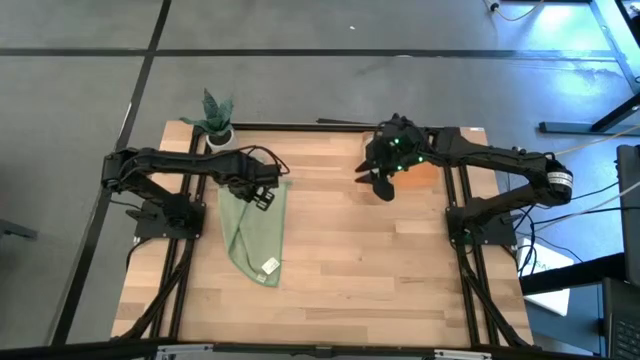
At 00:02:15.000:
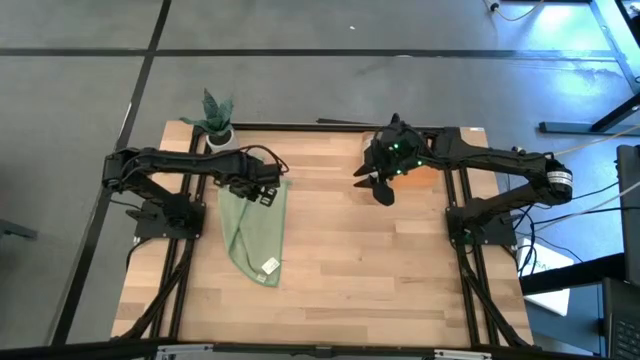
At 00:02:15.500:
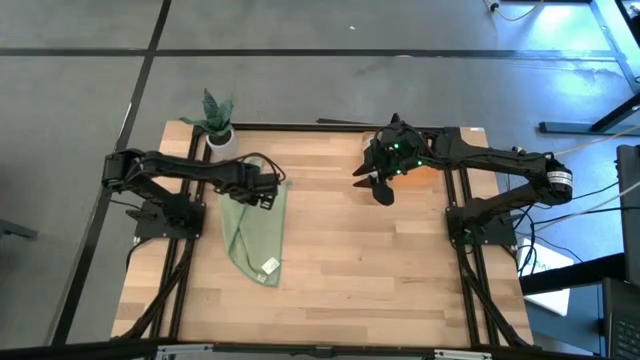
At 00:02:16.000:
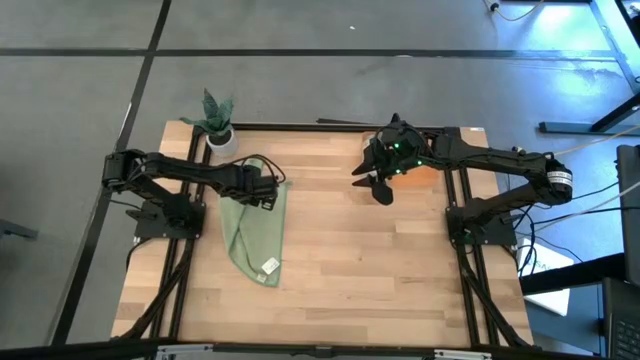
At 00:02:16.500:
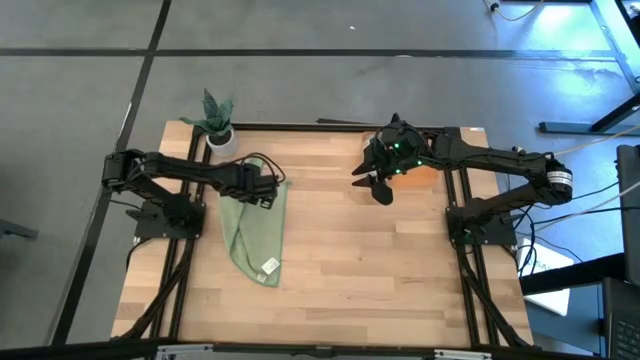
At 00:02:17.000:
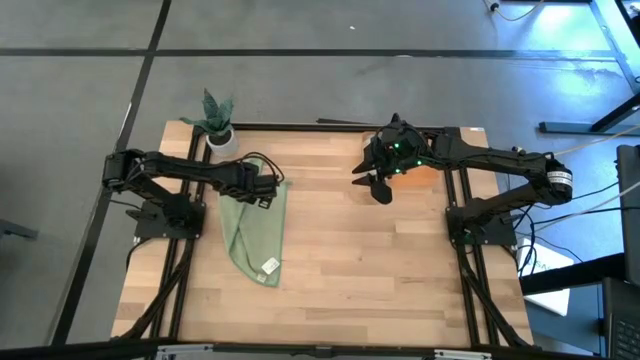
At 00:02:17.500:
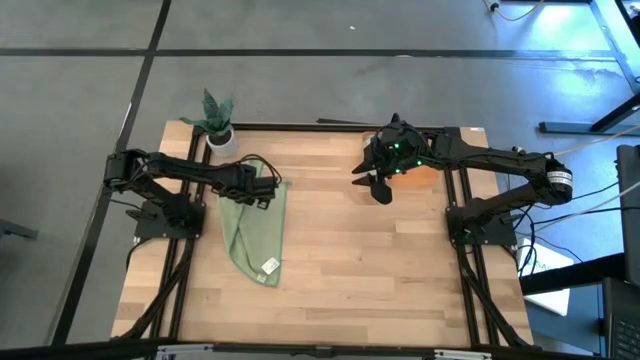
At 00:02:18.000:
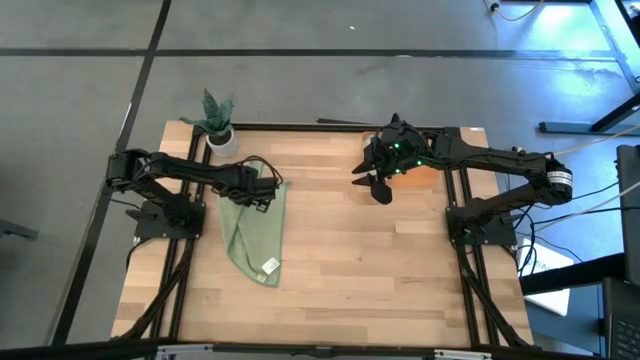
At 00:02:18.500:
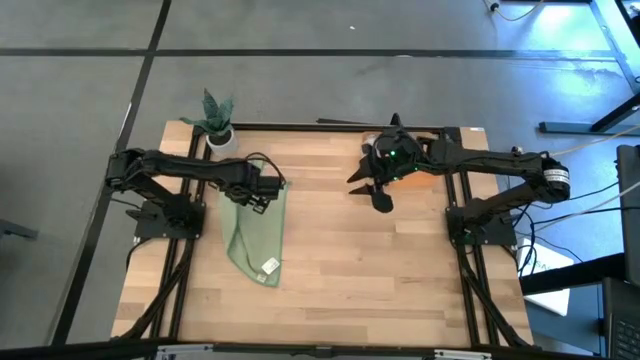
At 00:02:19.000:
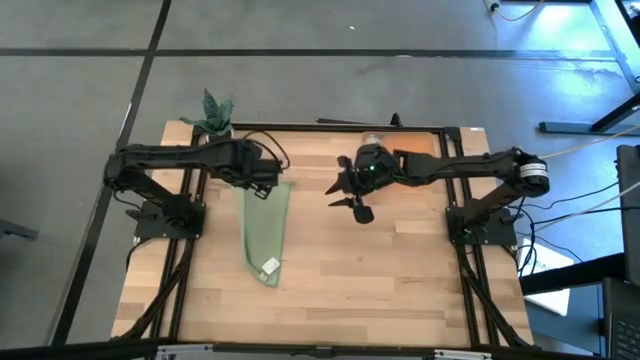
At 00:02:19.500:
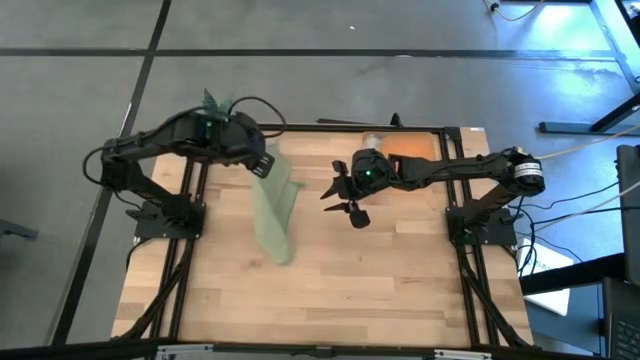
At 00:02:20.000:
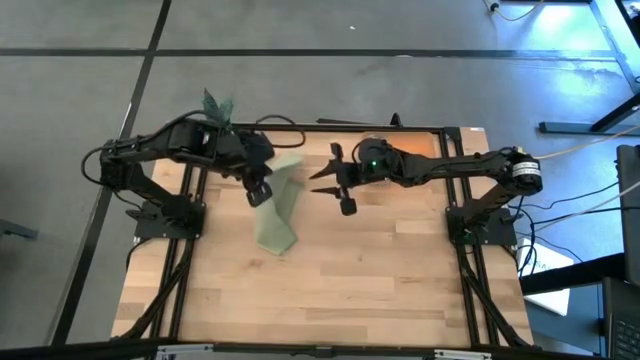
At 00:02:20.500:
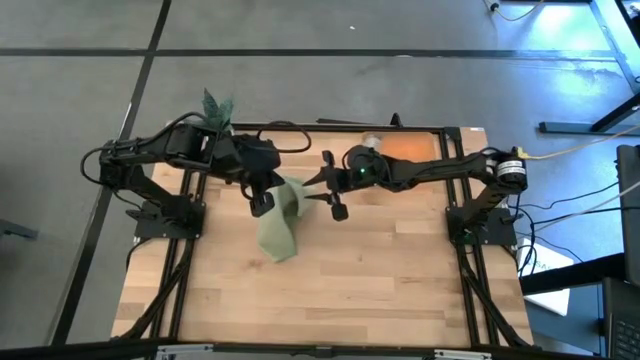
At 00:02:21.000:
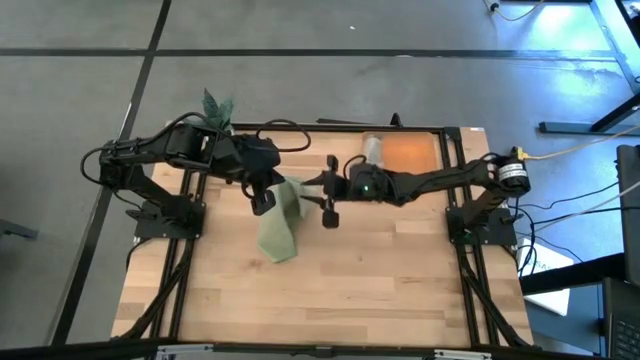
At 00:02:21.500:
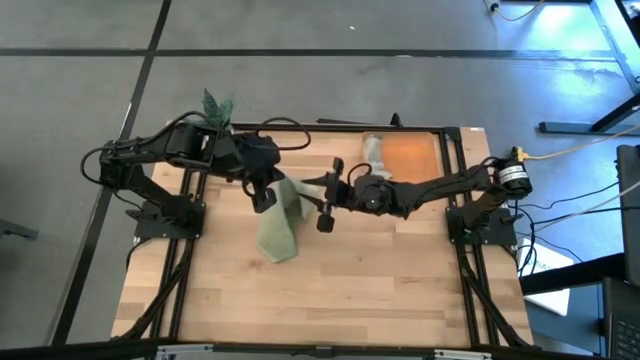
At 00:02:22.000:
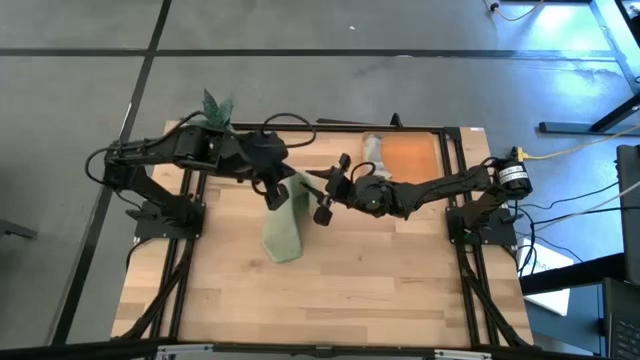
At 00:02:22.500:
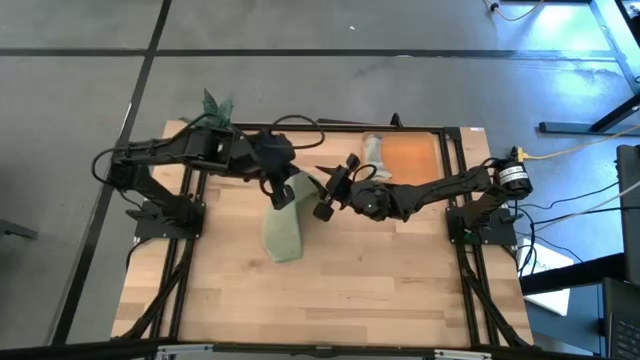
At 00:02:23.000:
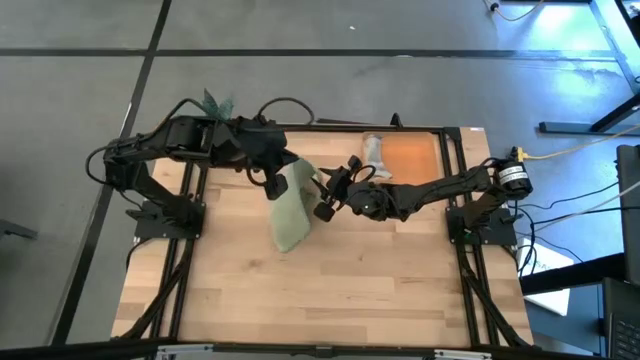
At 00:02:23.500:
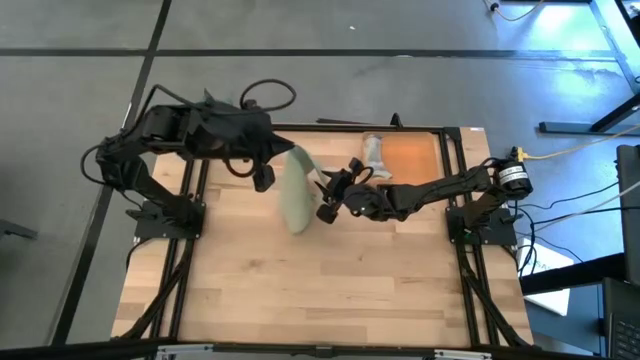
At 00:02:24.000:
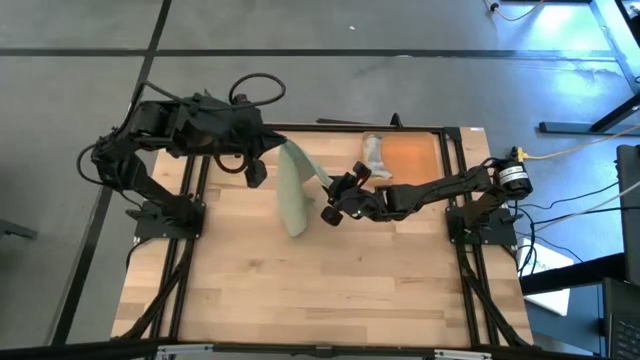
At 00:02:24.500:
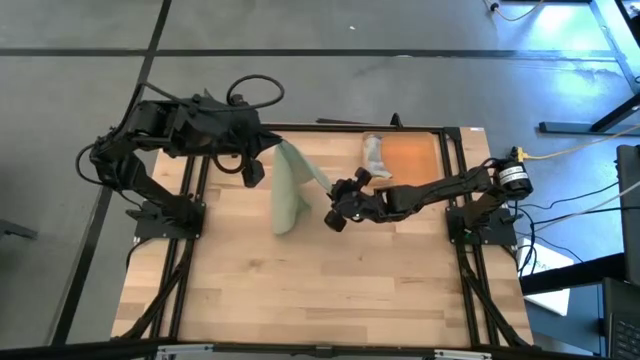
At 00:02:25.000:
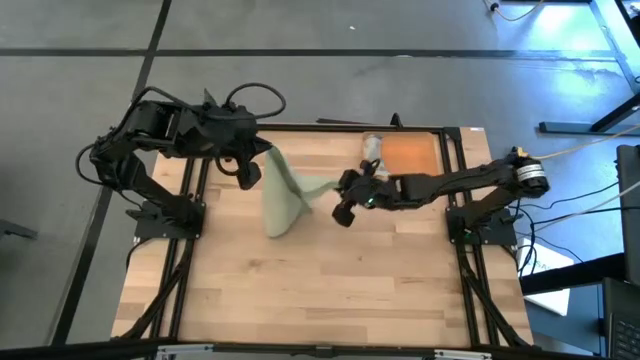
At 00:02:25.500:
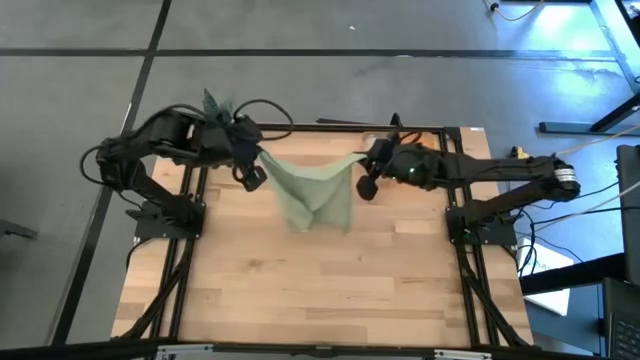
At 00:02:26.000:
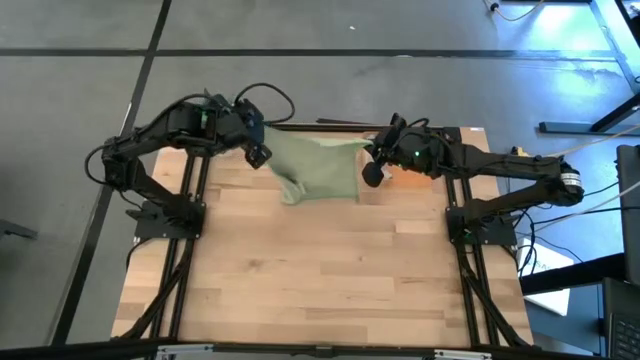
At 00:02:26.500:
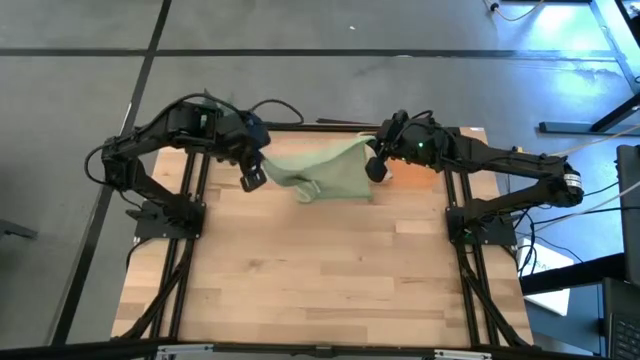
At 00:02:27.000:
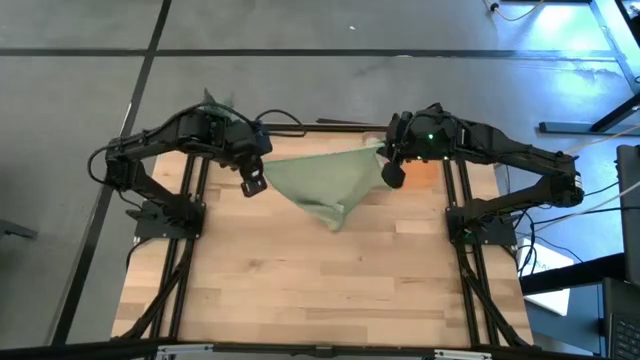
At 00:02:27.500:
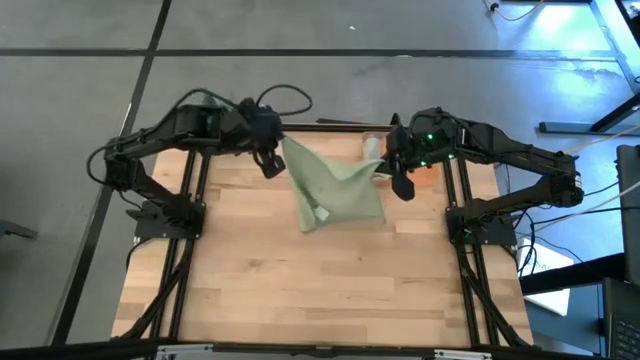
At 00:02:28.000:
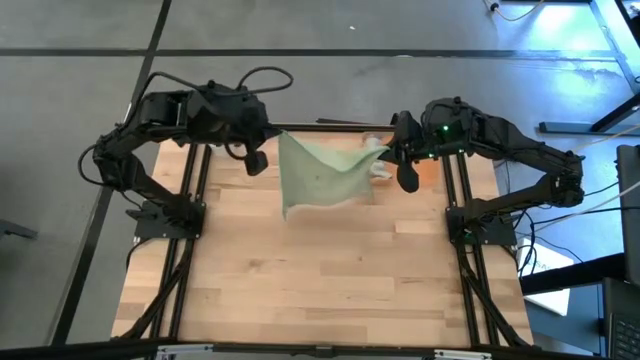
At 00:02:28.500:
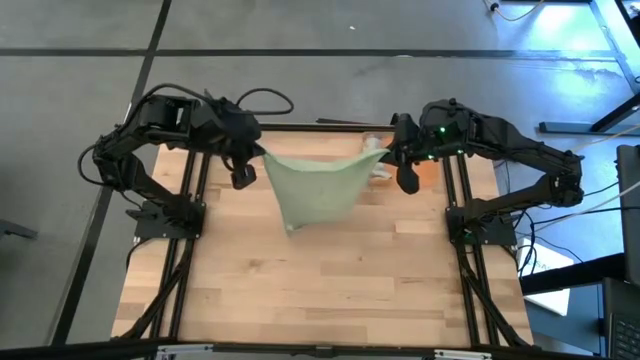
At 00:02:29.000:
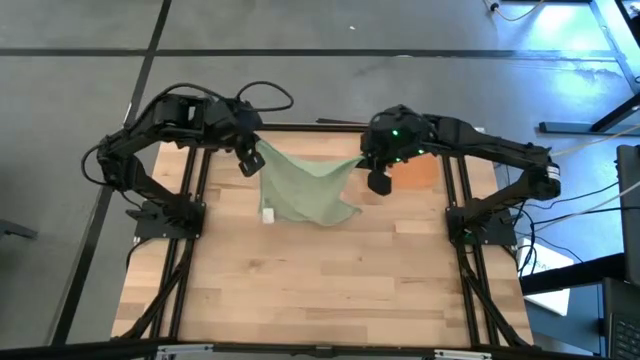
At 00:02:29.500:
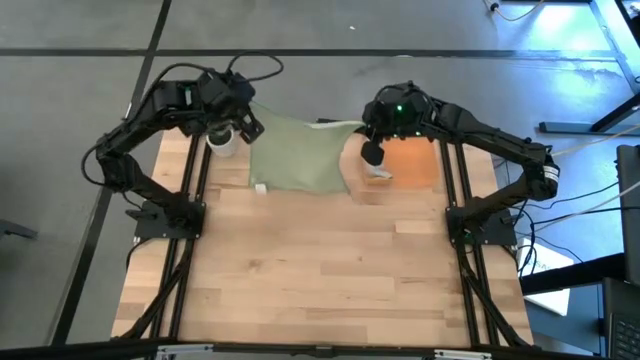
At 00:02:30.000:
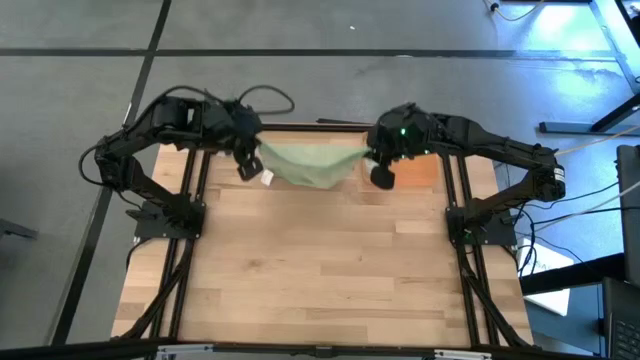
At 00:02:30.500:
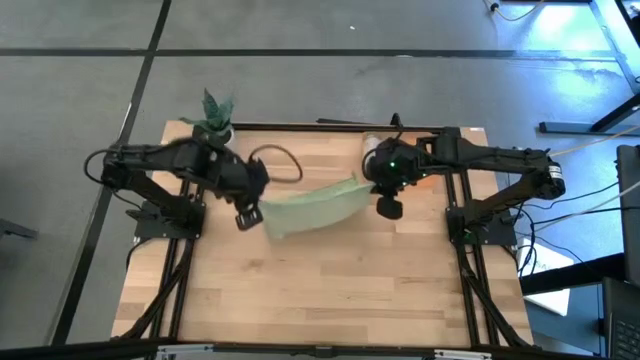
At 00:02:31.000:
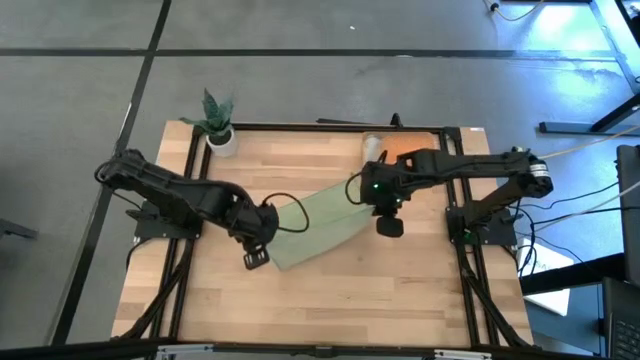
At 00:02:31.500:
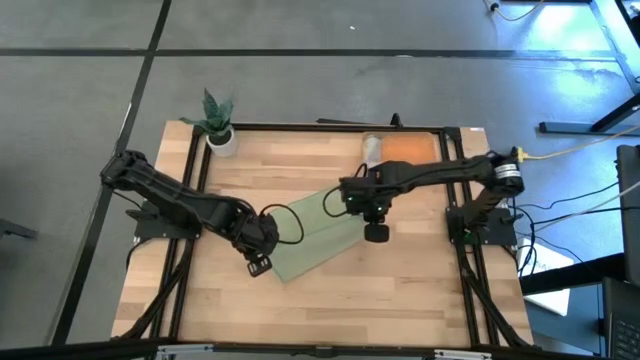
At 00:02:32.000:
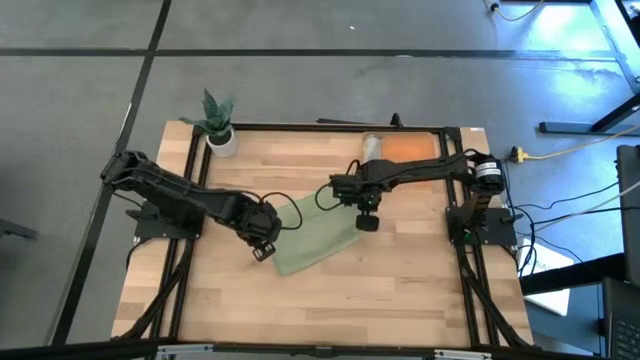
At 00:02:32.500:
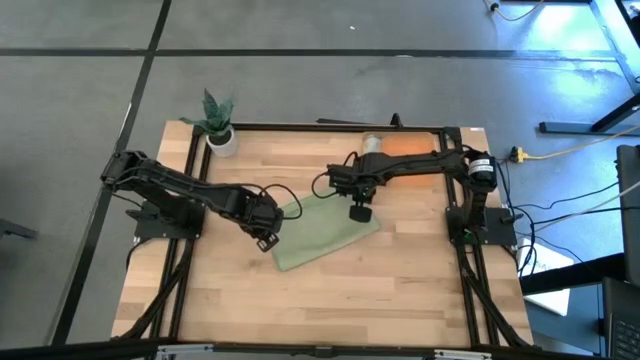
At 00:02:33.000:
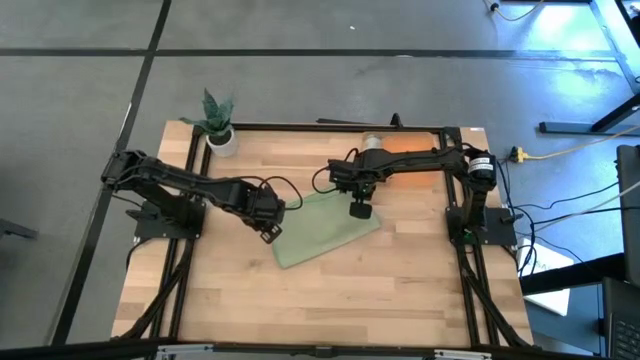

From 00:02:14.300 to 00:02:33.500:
Task: Roll microfiber towels into tight, uniform cylinder then place into a basket
Fold the green microfiber towel

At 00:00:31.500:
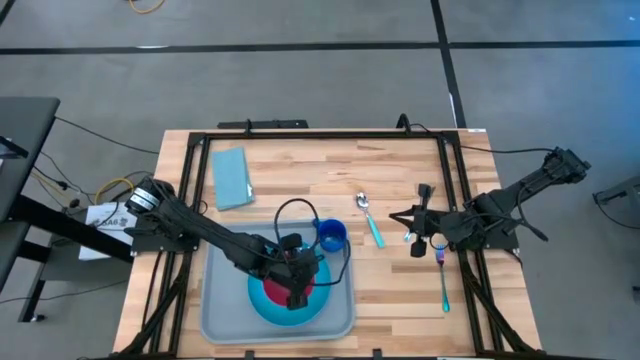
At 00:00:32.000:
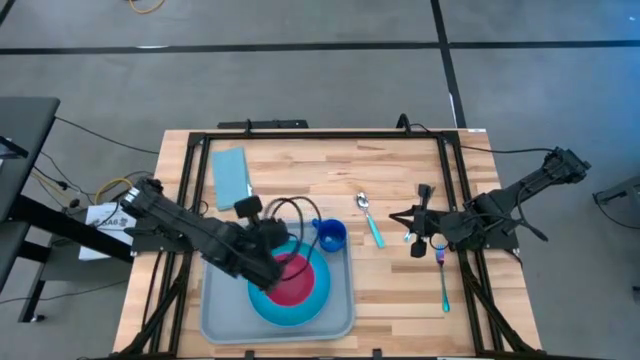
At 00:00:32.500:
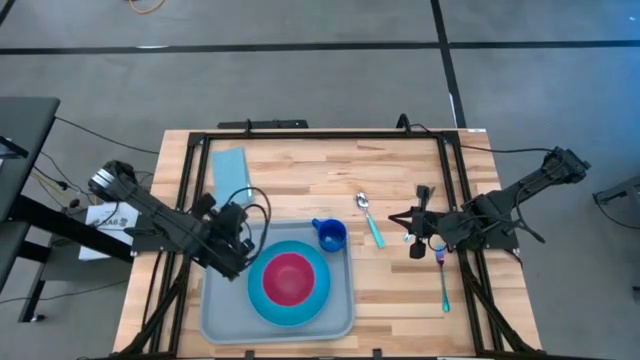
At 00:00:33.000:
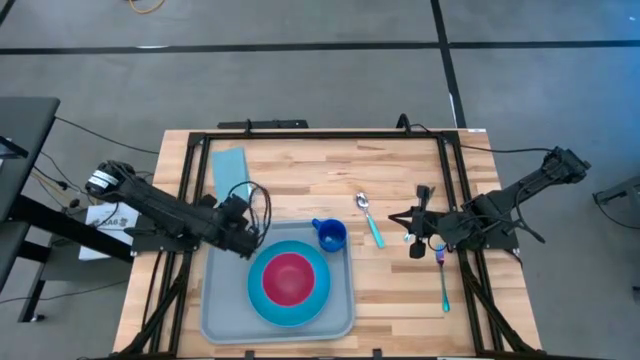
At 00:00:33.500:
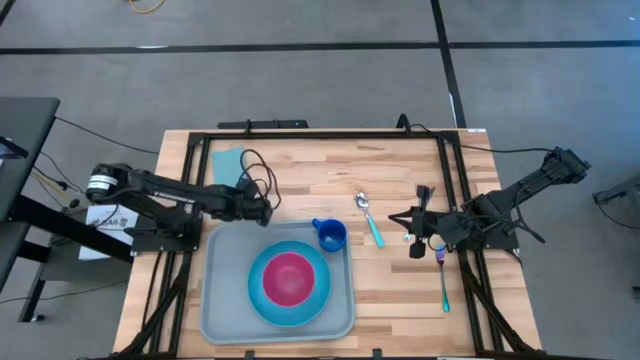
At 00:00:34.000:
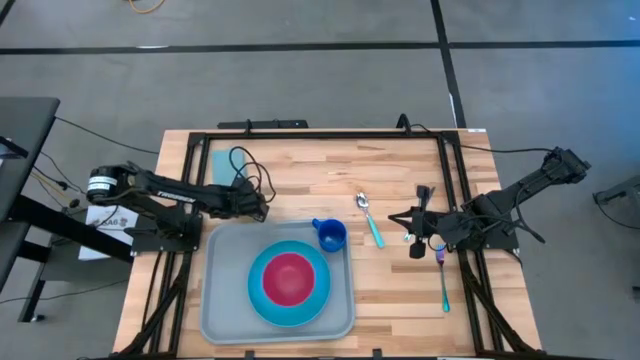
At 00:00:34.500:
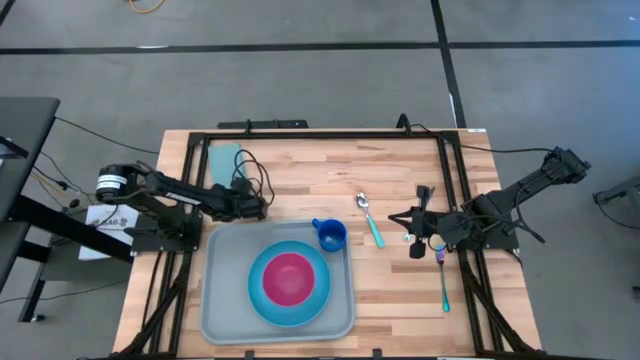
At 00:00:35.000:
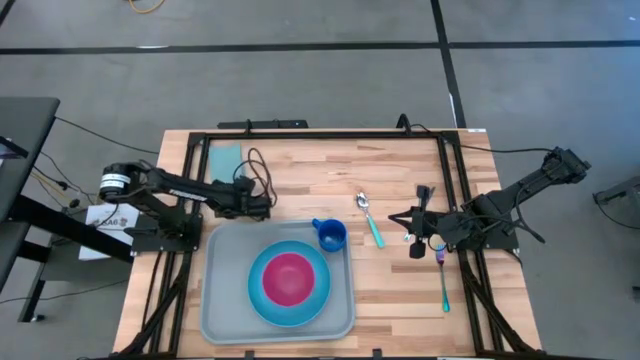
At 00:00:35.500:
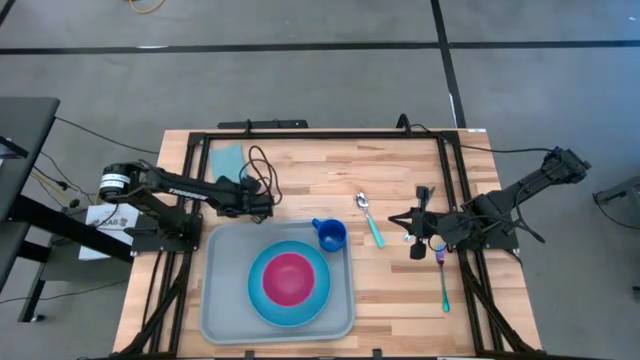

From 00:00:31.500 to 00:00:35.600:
Task: Set up tray
Put the blue napkin beside the blue plate on the gray serving tray
